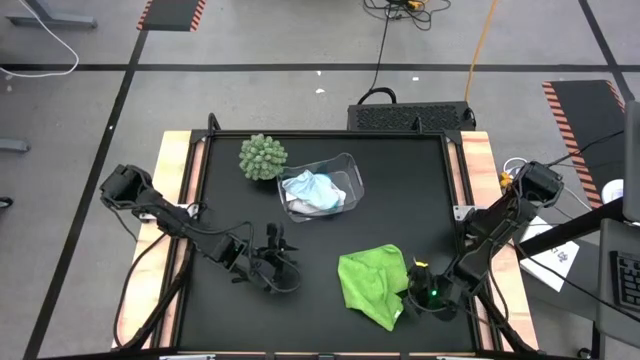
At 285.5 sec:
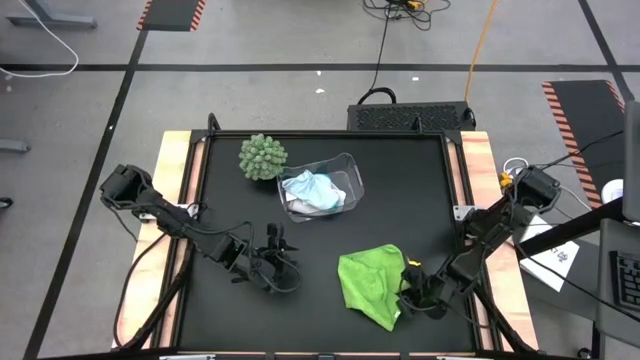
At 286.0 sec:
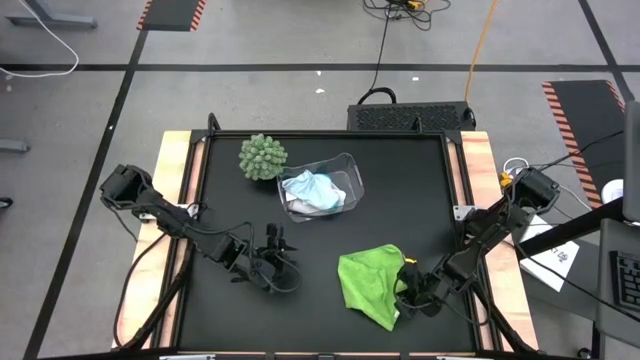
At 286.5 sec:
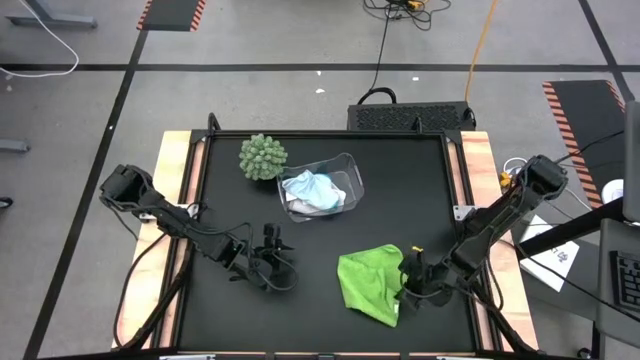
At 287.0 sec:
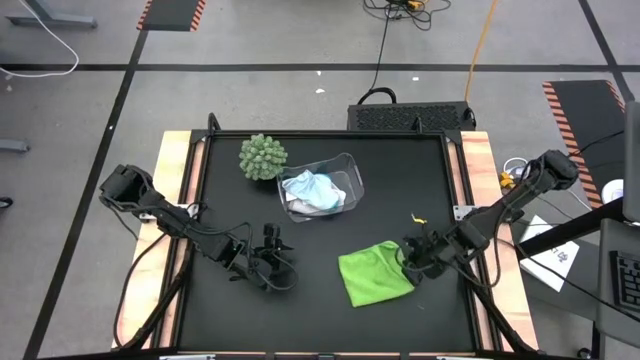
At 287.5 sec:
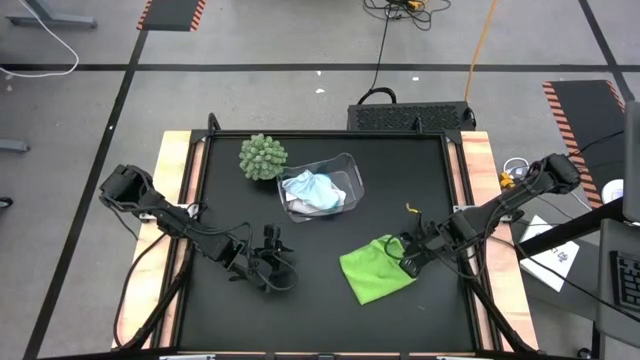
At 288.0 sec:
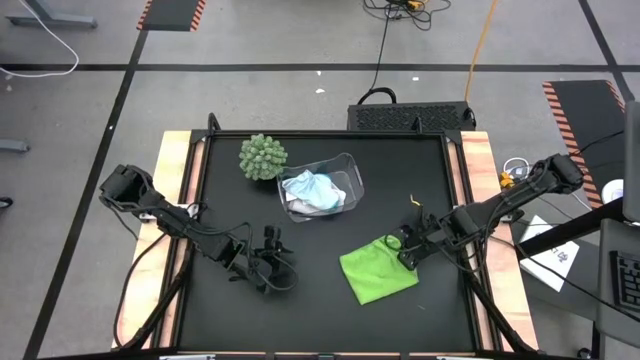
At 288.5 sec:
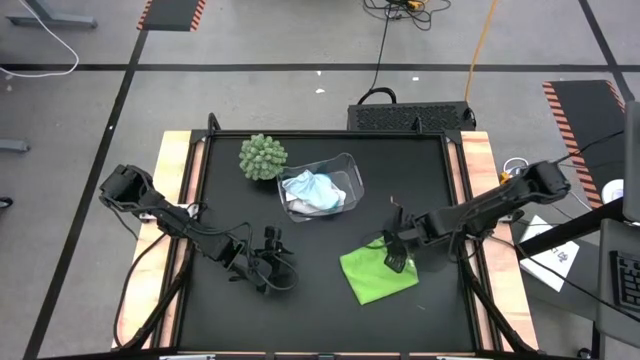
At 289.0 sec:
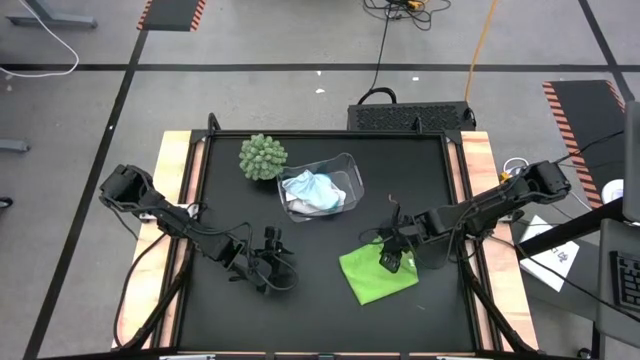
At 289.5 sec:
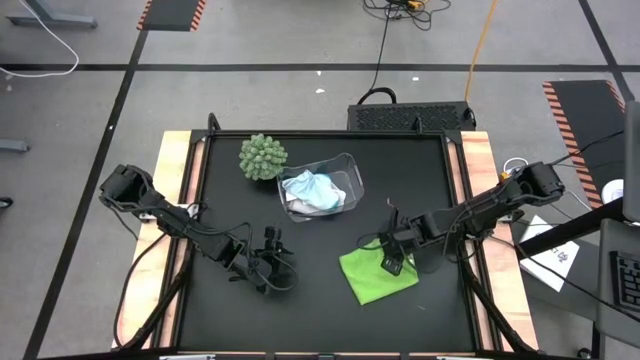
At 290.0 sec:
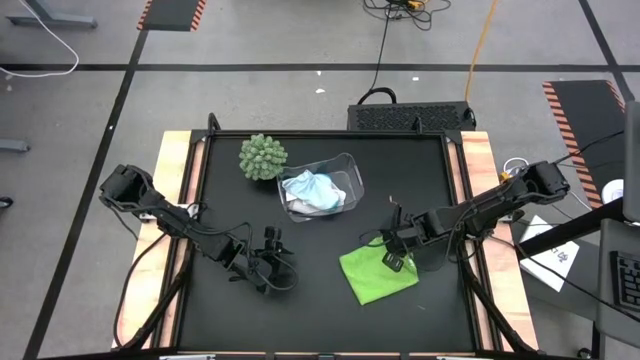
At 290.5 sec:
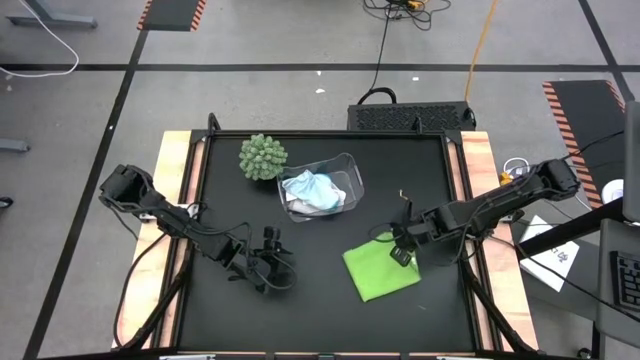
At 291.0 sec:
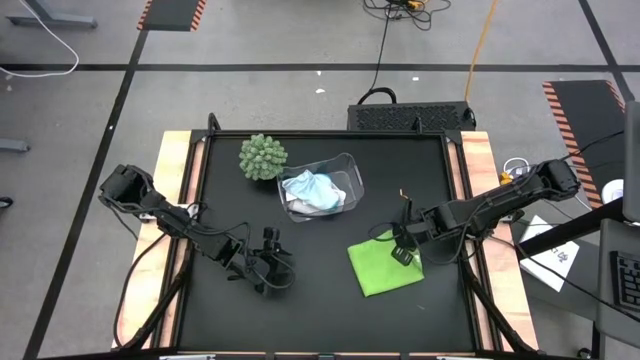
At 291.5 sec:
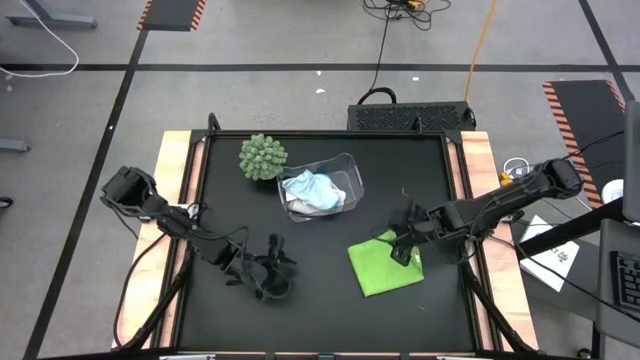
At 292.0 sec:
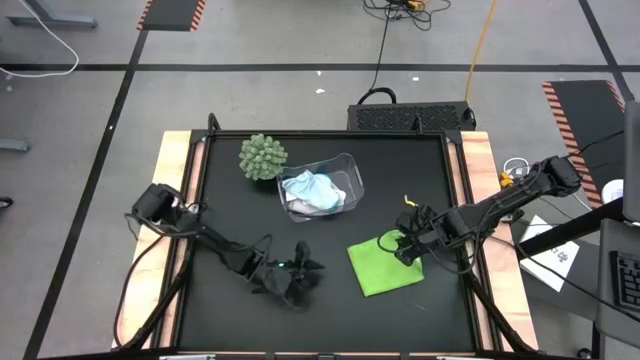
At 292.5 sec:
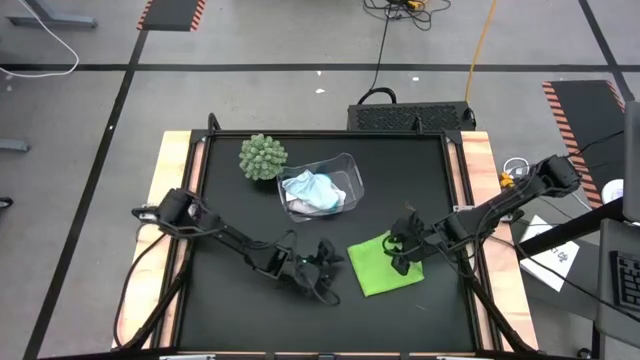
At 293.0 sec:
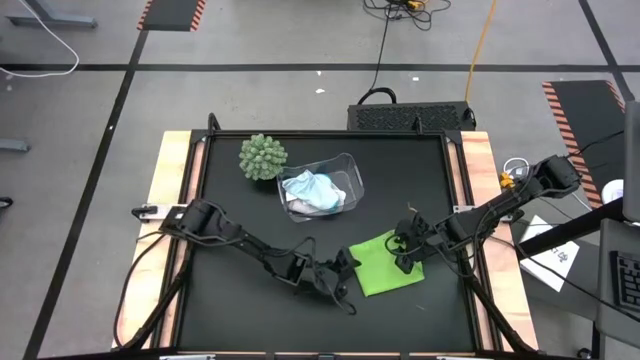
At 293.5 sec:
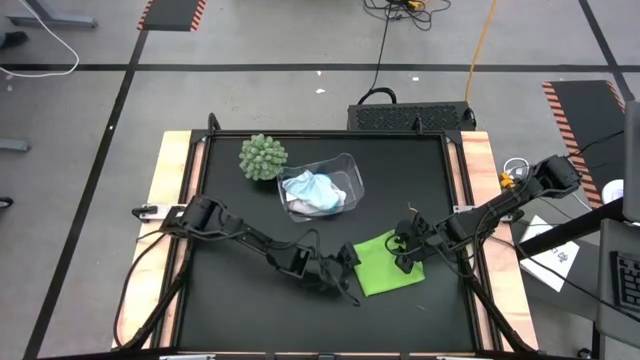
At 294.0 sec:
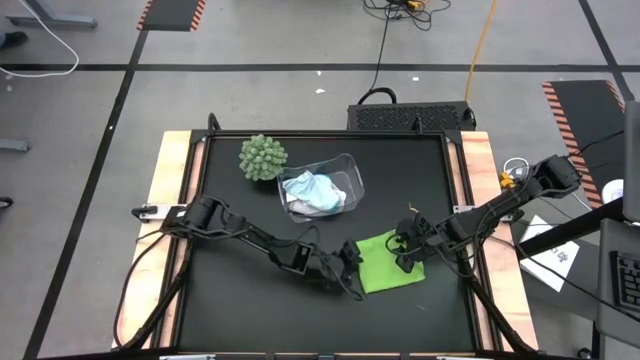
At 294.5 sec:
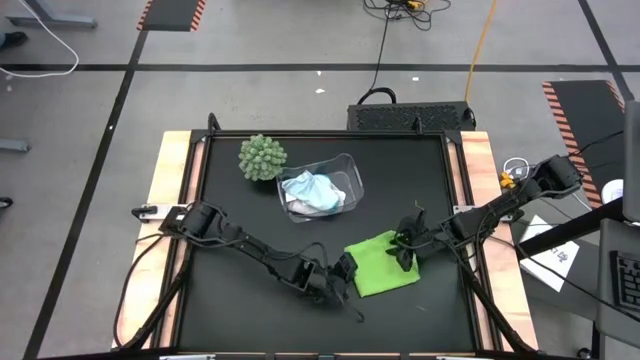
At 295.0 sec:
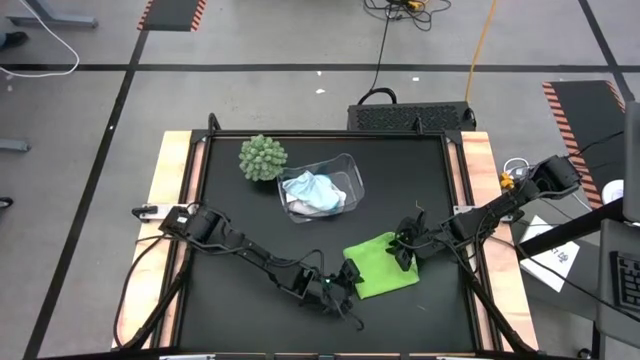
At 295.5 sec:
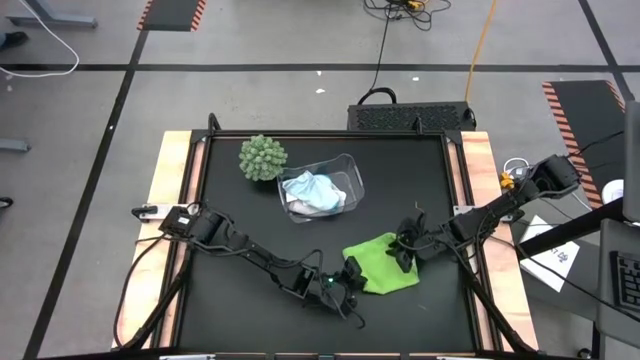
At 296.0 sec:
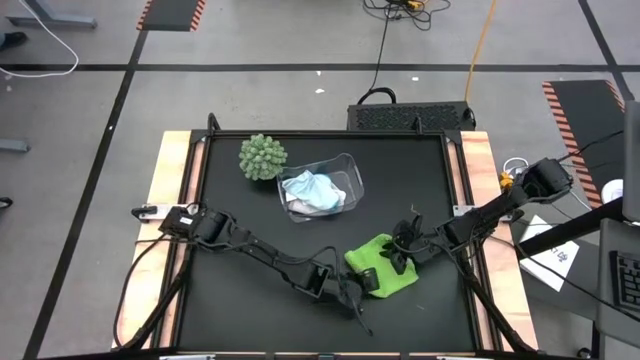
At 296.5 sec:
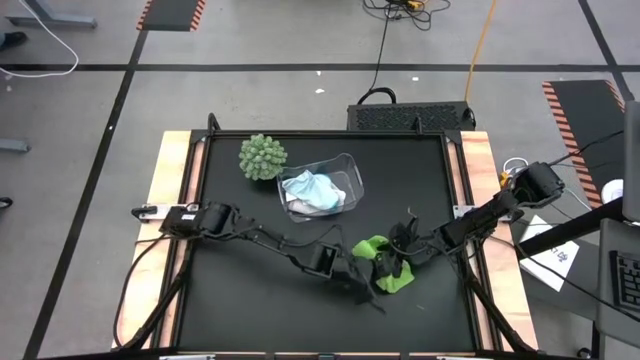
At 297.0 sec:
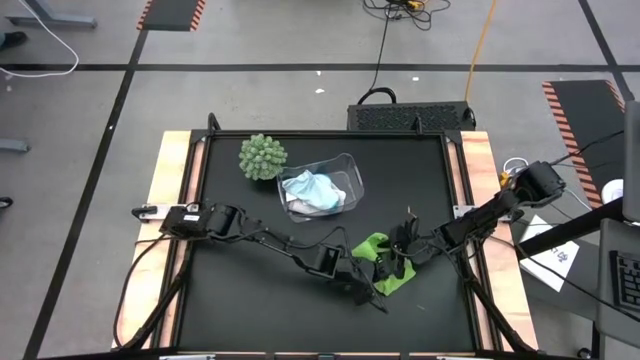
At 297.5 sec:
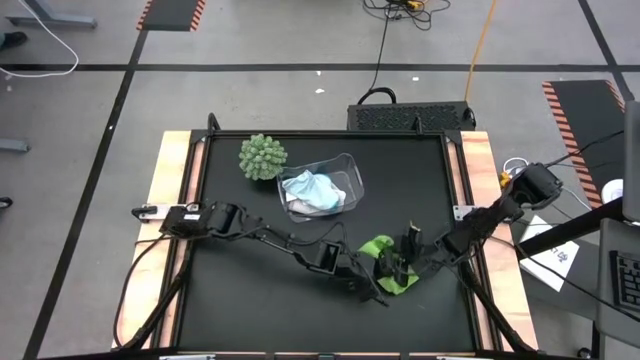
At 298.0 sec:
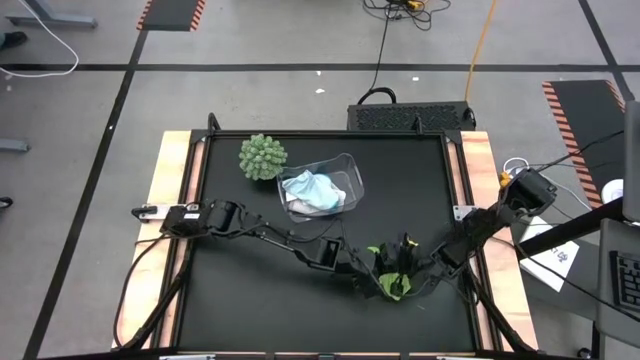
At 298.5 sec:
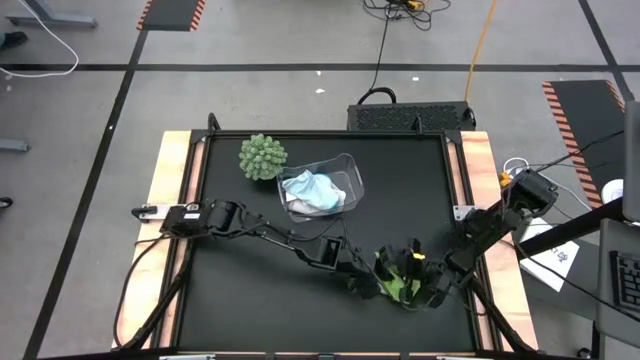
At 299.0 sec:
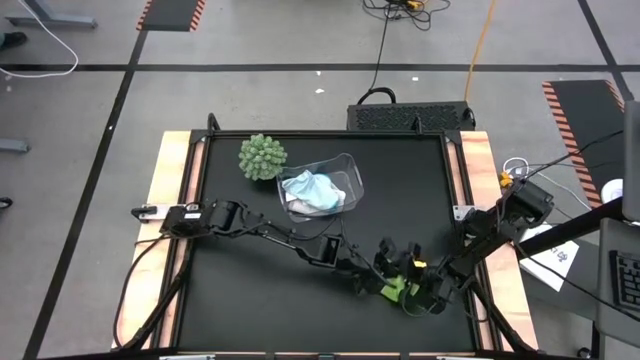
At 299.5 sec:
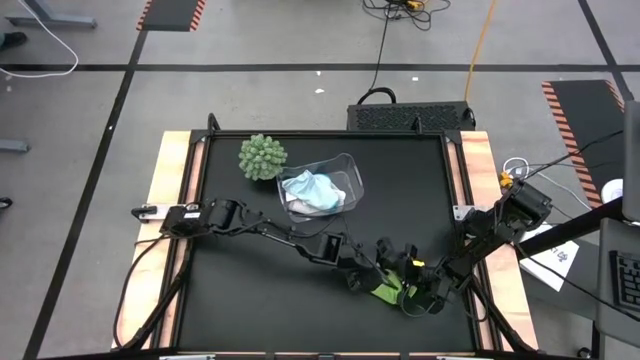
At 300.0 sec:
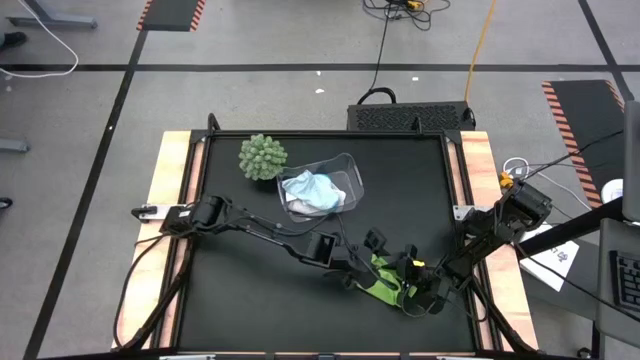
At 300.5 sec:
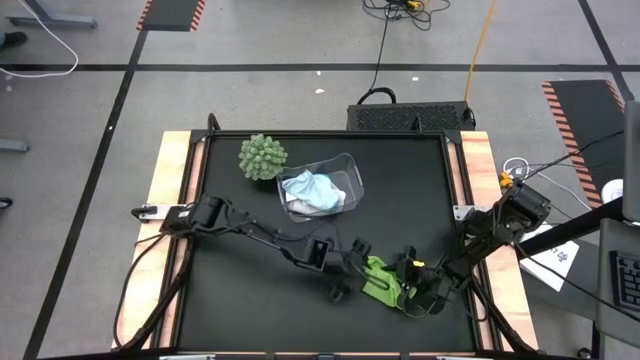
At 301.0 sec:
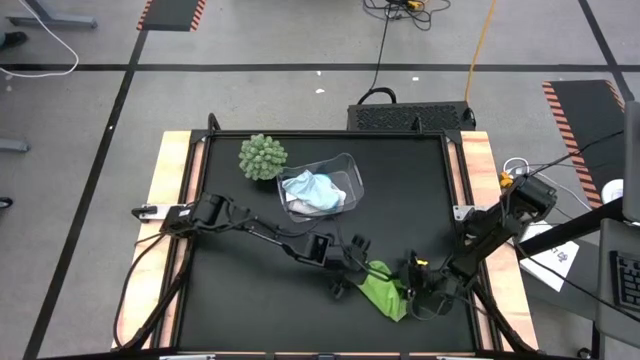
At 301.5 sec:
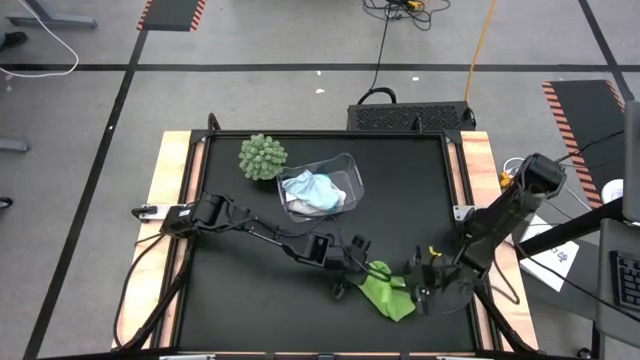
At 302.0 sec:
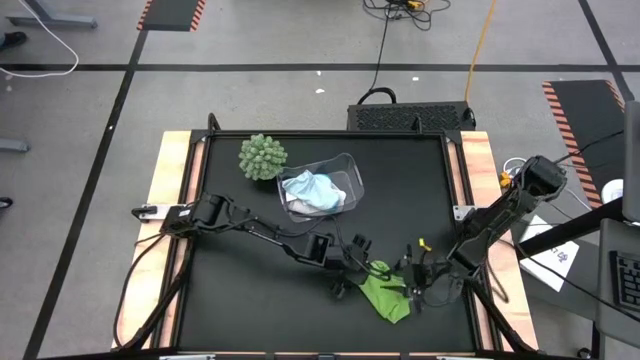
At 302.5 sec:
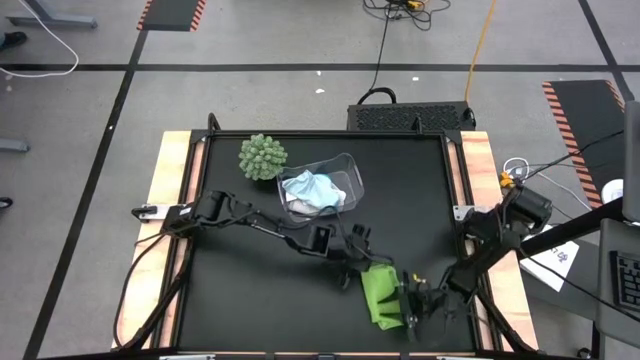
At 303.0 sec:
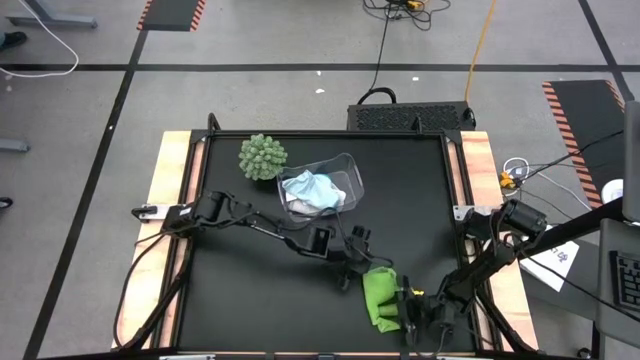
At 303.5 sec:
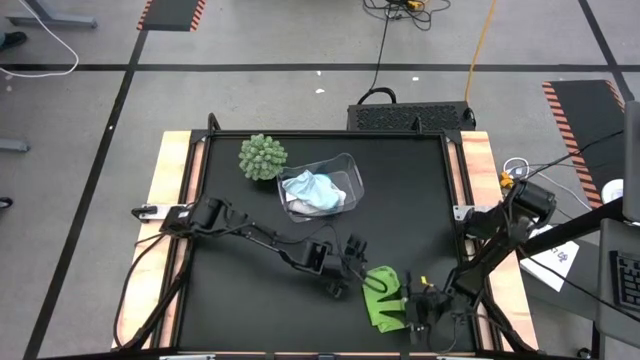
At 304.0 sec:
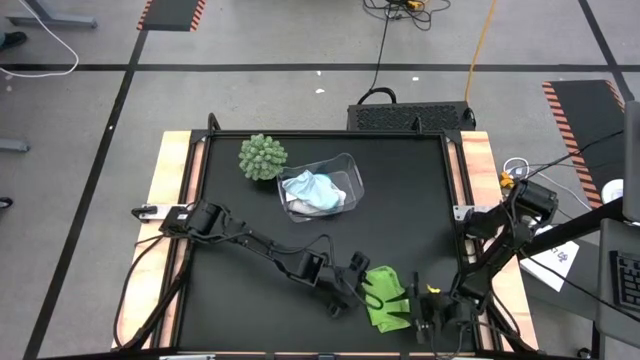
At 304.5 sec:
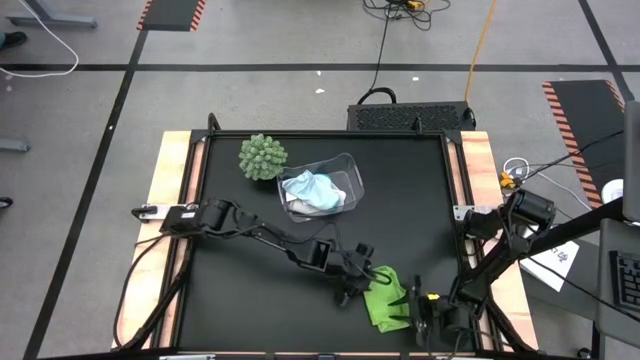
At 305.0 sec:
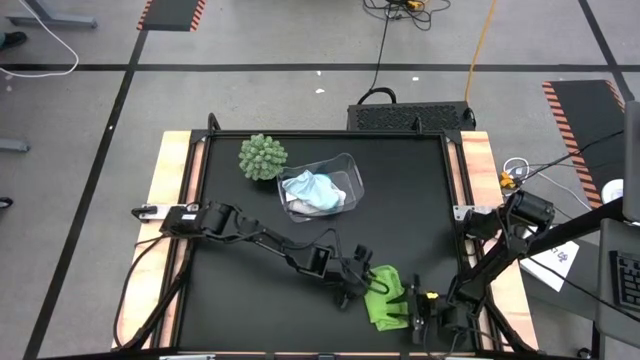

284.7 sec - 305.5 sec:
Task: Fold microfiber towels
Fold the green towel

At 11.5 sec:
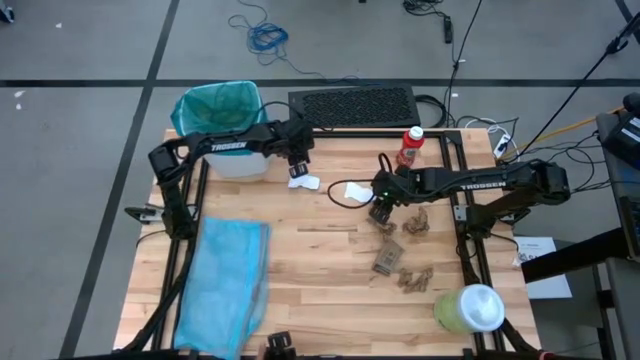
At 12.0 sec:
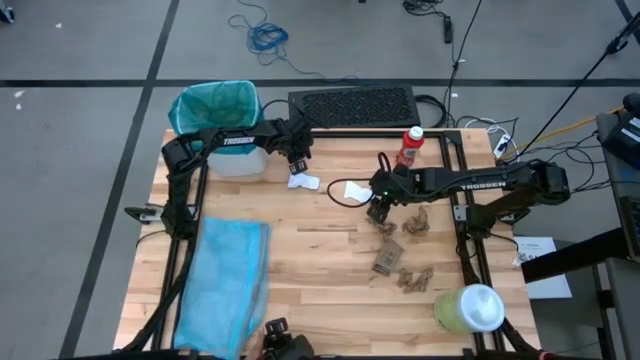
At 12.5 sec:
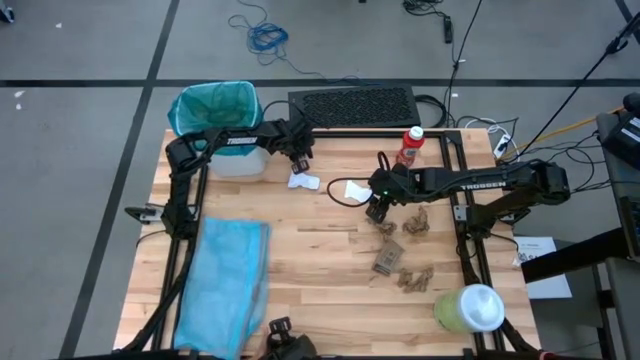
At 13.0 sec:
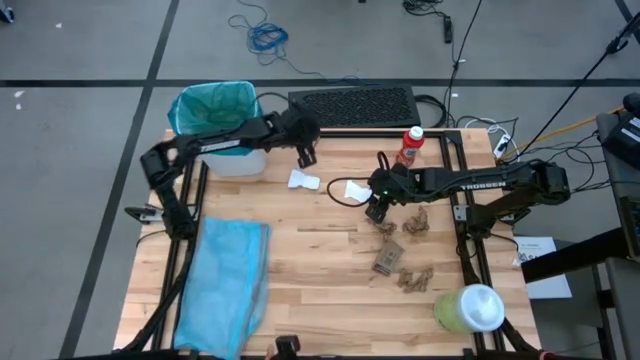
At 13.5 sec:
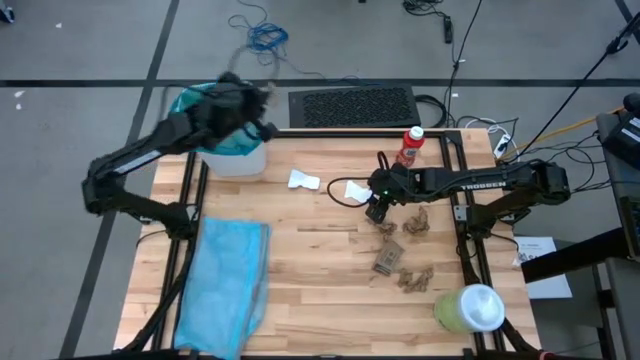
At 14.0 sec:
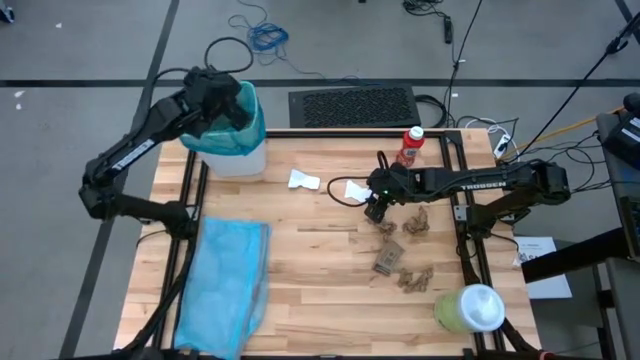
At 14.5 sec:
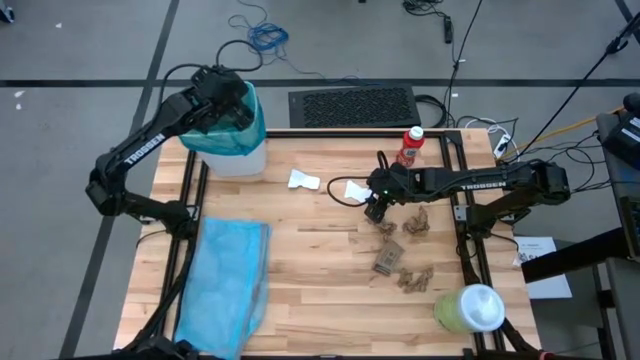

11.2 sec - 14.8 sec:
Task: place trash/remove bag and relplace
Put the brown napkin into the trash bin
